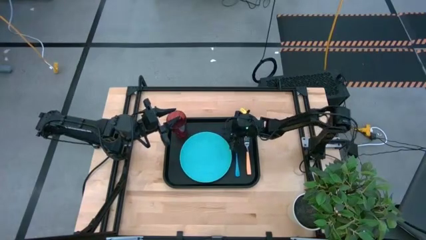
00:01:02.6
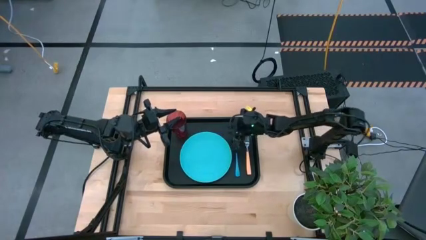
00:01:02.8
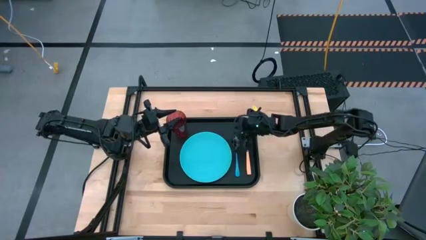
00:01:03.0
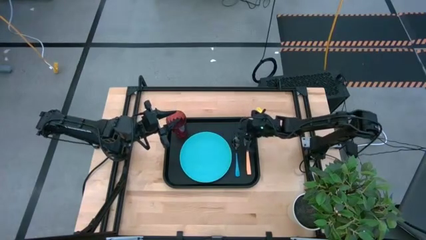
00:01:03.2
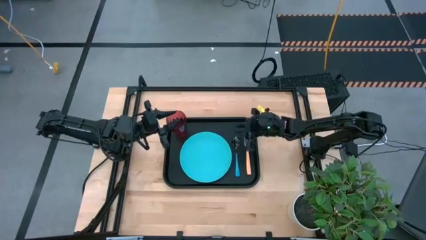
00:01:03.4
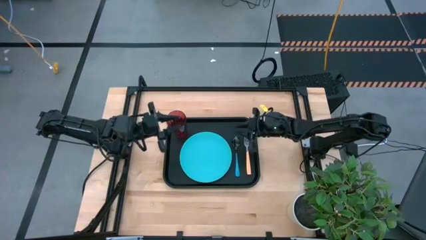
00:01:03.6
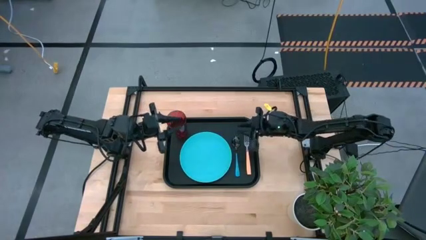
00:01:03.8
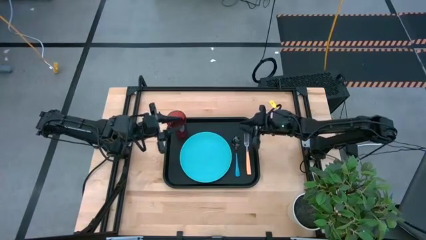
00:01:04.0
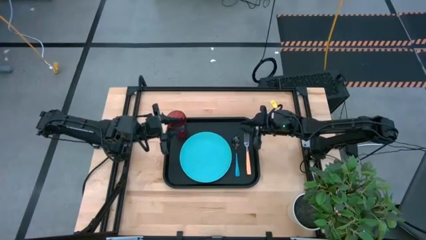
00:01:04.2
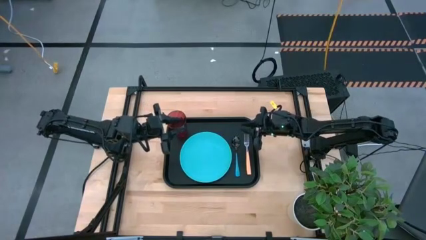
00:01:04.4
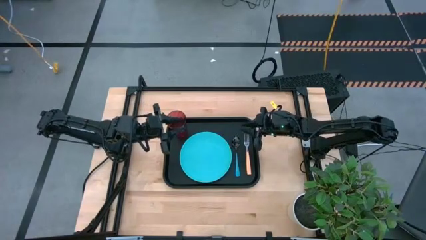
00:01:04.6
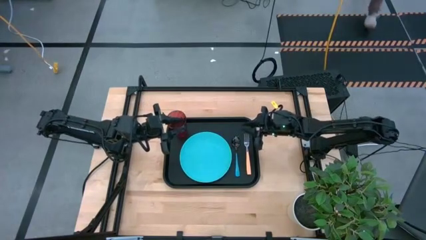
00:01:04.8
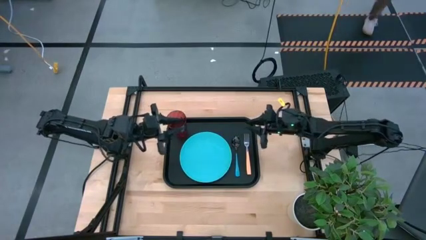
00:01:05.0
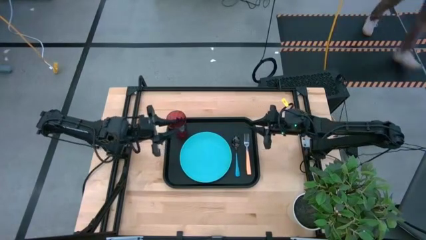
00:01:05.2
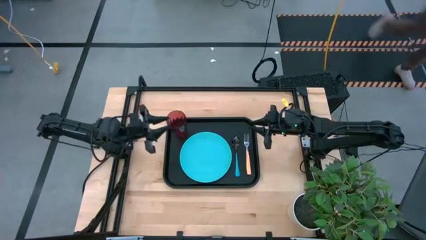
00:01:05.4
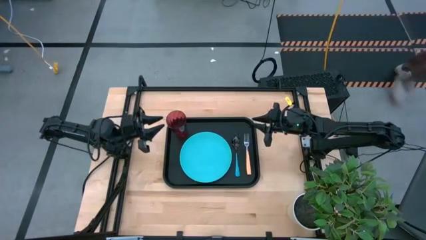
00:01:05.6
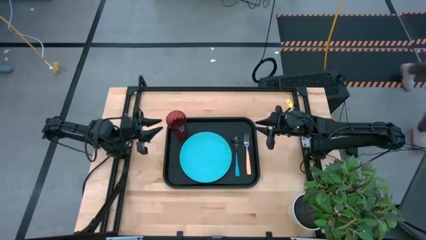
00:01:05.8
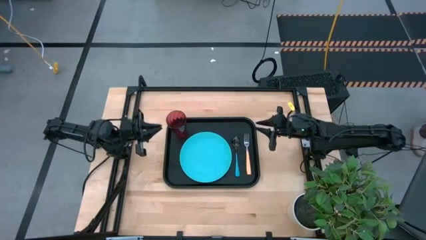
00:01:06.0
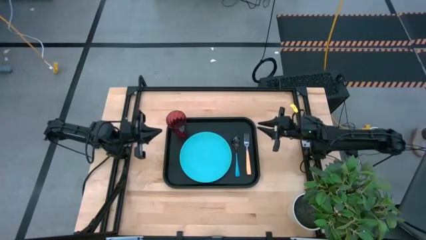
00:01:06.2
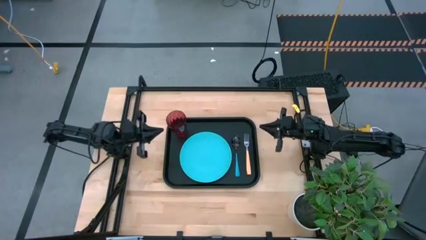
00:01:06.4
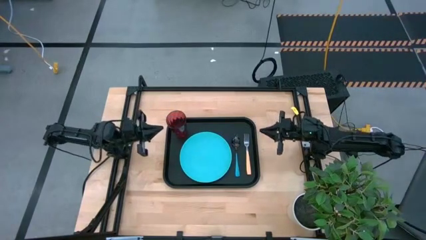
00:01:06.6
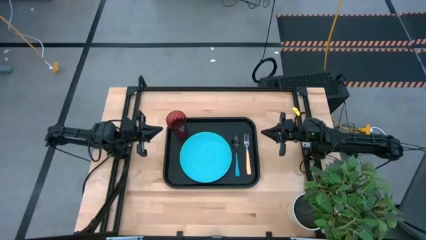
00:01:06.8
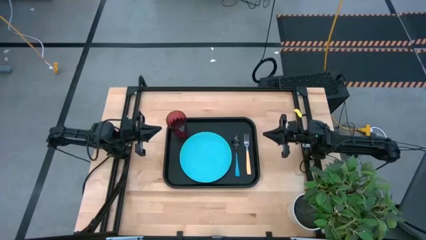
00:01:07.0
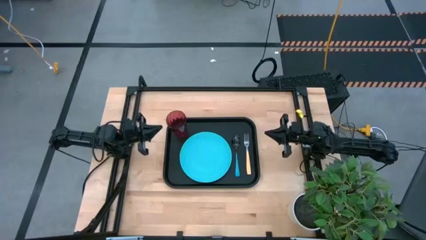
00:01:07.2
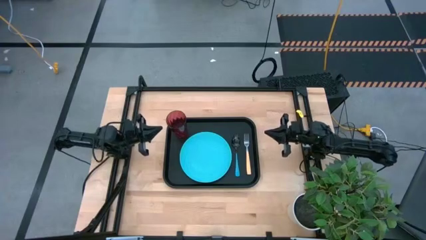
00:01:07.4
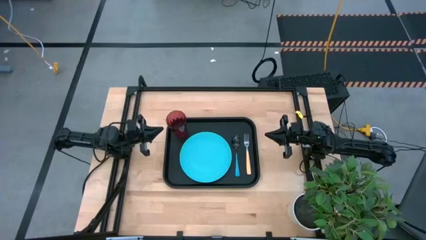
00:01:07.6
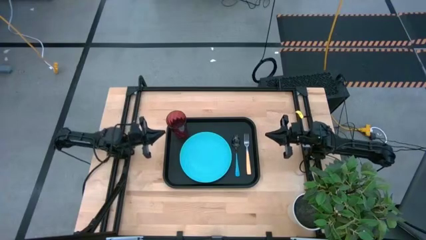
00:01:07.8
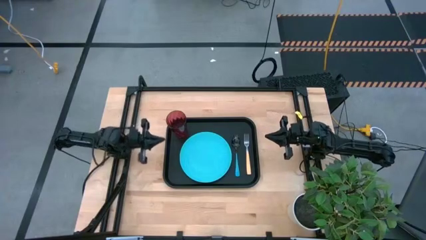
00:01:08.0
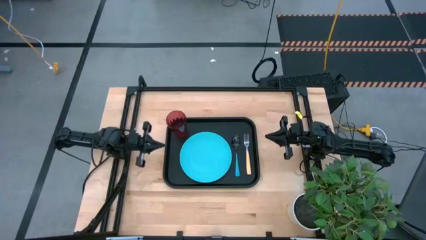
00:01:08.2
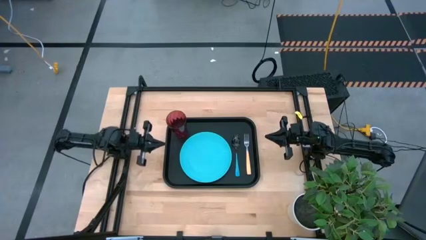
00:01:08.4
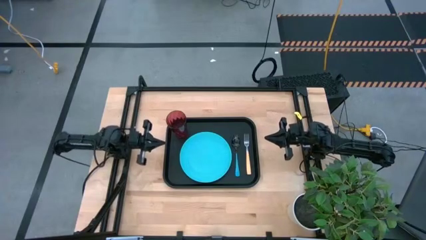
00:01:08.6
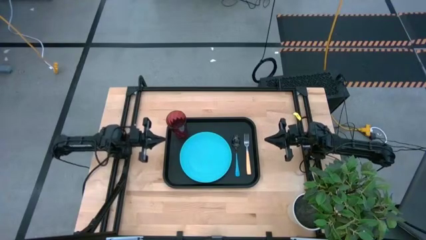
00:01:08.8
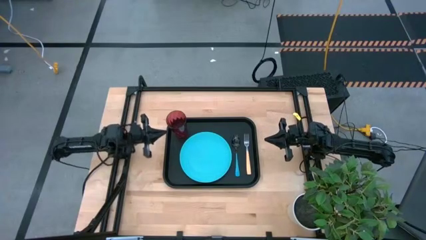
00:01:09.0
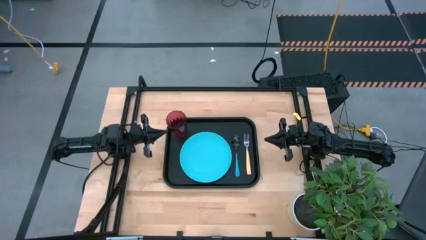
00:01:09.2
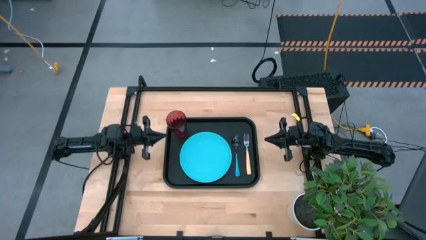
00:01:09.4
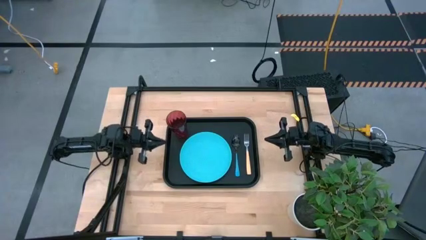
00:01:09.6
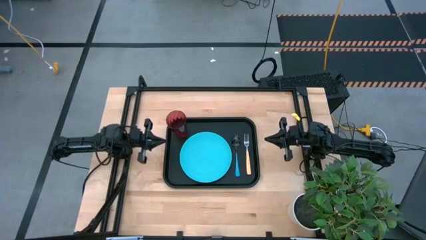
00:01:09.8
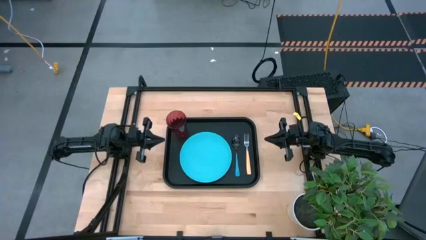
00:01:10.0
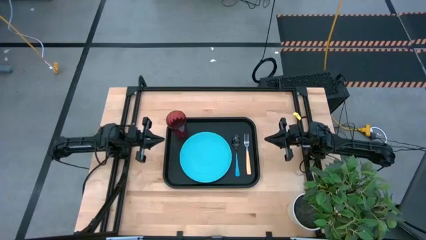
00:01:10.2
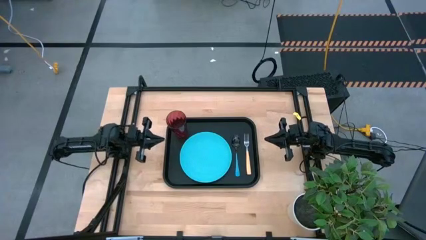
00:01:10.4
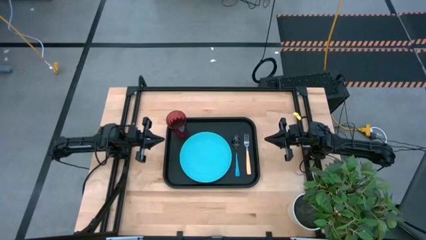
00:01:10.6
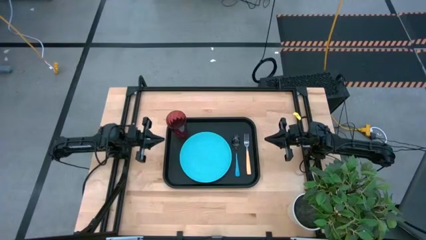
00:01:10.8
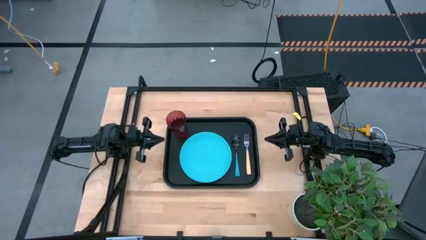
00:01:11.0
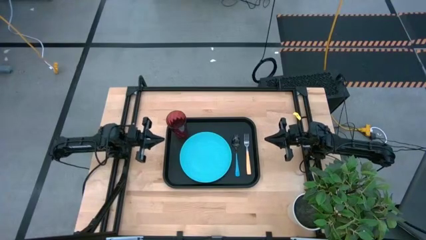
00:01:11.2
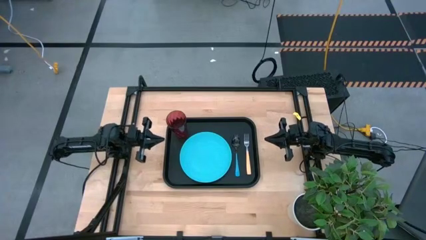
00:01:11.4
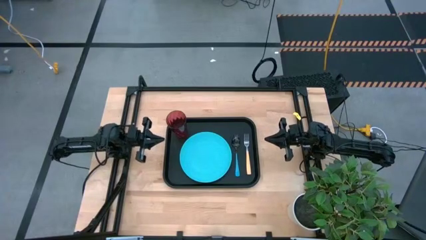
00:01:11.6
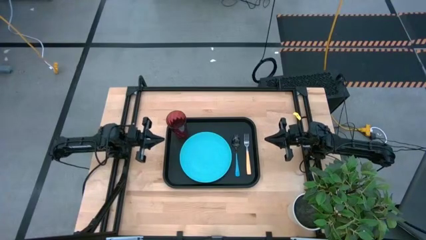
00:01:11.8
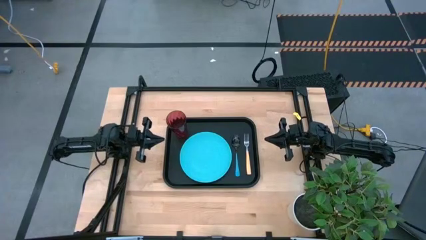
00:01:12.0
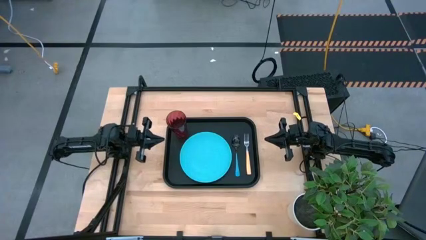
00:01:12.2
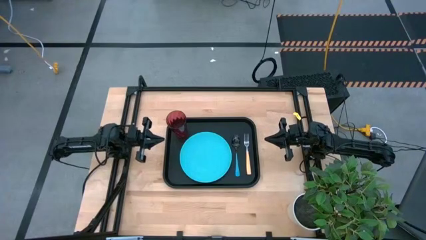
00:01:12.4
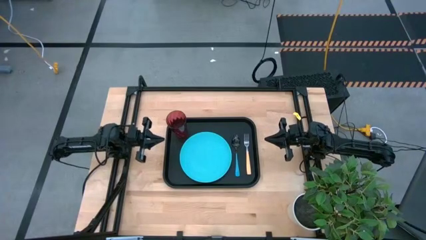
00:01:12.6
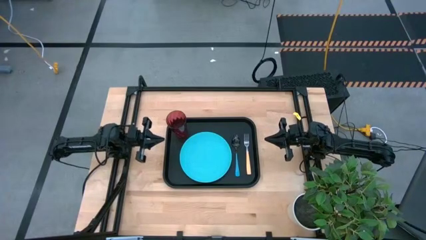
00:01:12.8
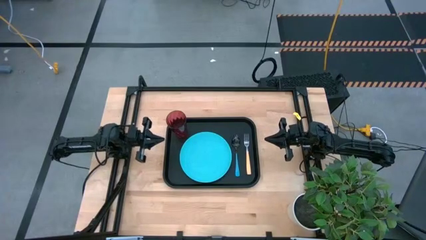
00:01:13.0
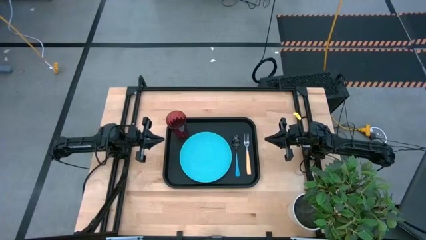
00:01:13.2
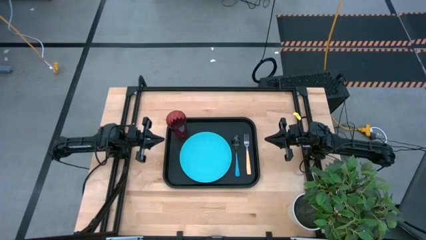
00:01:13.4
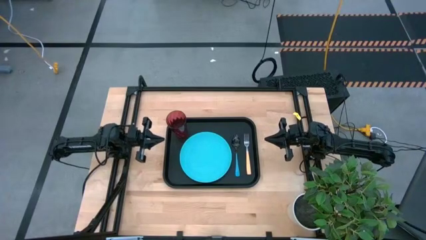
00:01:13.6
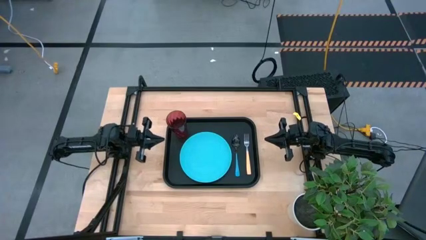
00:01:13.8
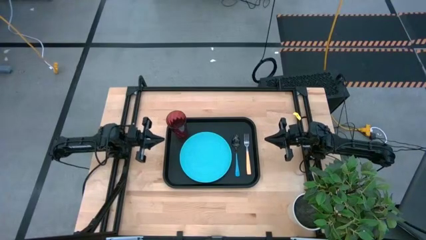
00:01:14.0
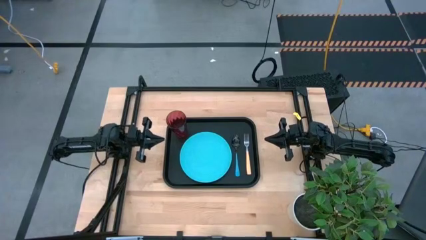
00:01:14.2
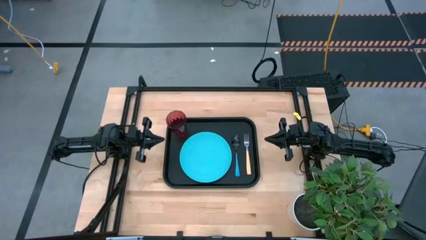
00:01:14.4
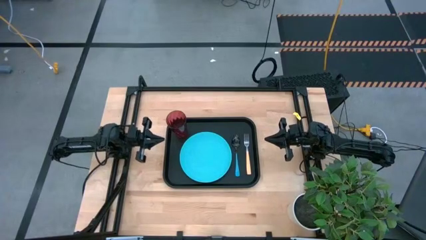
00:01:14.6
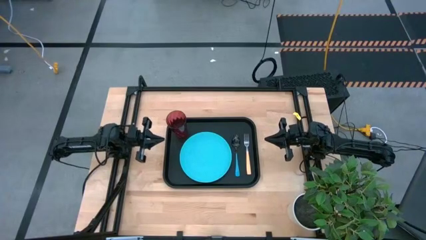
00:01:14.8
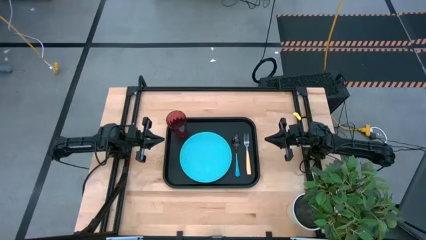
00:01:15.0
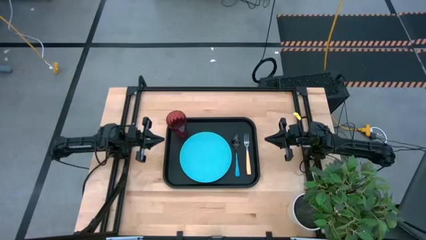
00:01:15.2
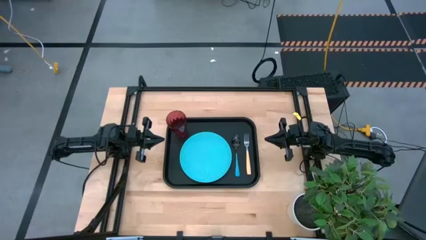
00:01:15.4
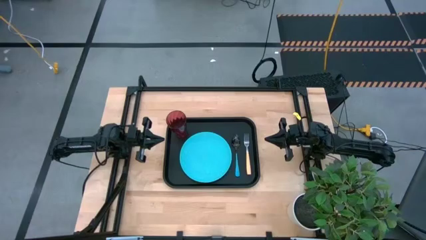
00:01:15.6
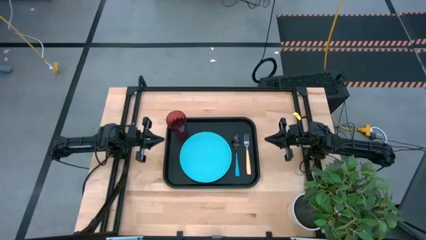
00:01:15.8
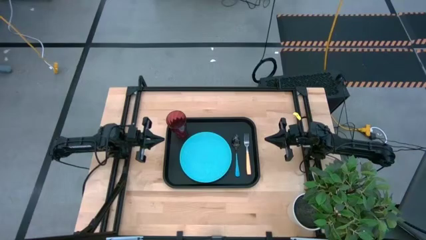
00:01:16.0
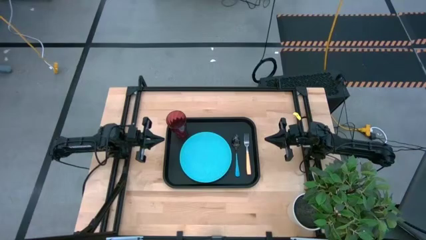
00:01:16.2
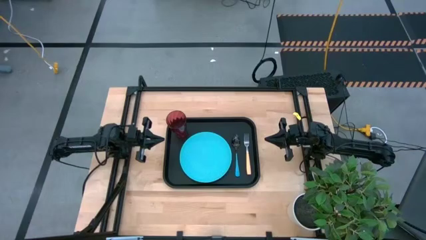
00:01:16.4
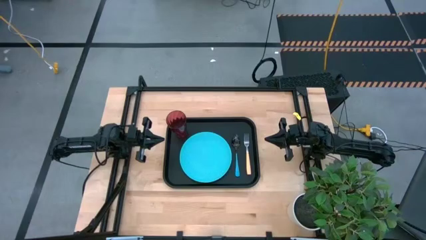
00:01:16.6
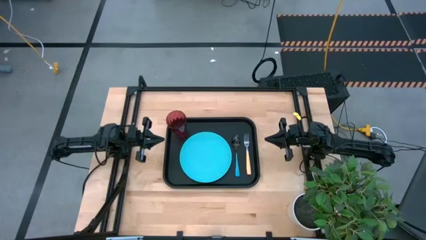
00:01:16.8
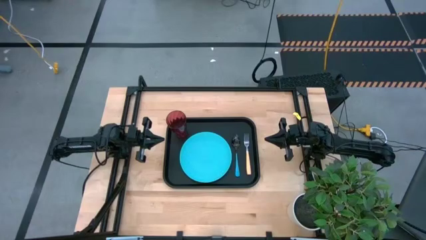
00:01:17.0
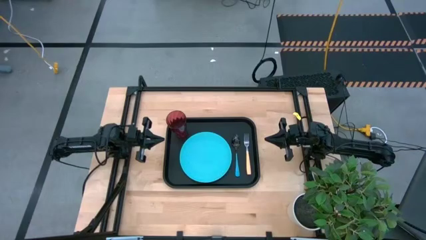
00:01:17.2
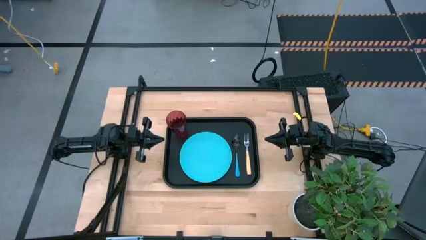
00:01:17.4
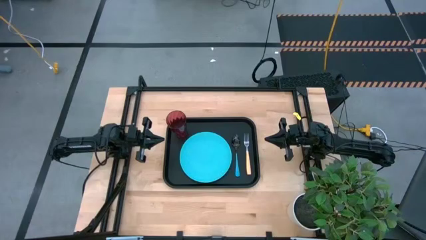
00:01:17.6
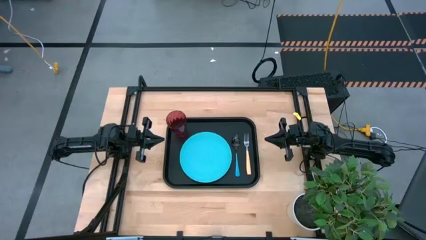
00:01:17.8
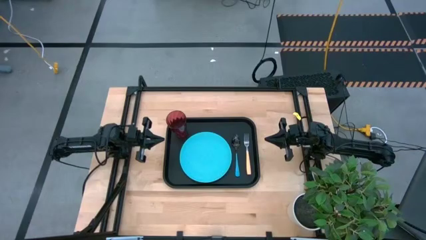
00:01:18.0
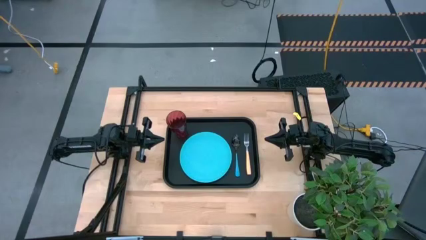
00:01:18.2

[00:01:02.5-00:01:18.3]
Task: Pick and place plate/cup/fork/spoon on tray
Return to Home Position
